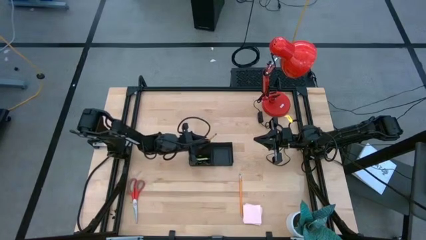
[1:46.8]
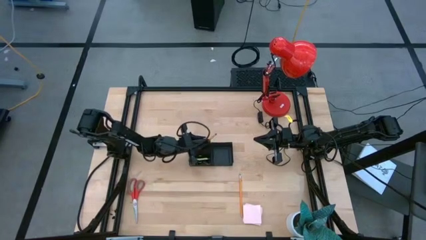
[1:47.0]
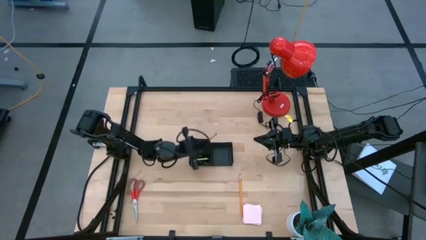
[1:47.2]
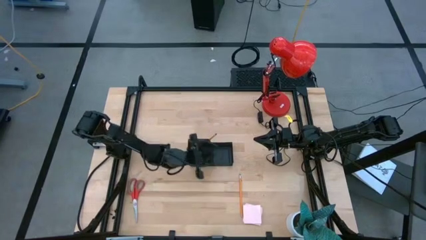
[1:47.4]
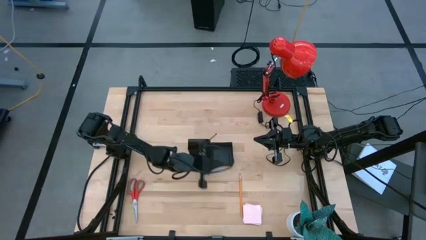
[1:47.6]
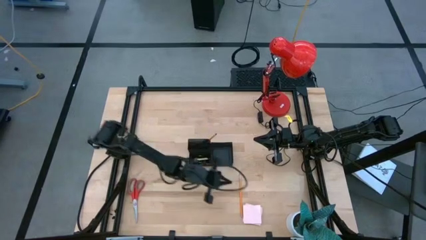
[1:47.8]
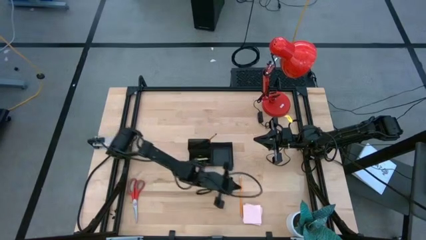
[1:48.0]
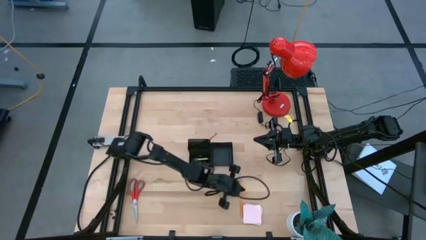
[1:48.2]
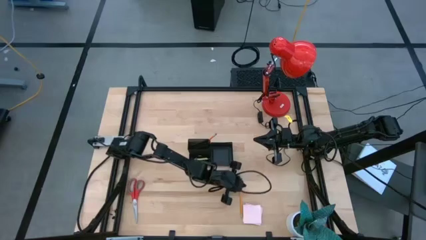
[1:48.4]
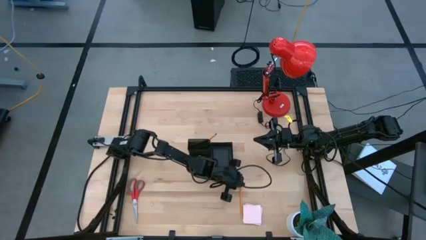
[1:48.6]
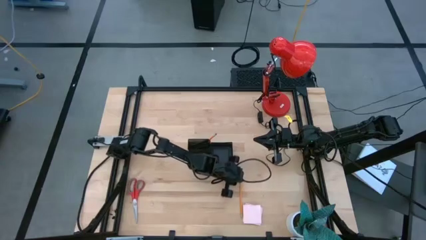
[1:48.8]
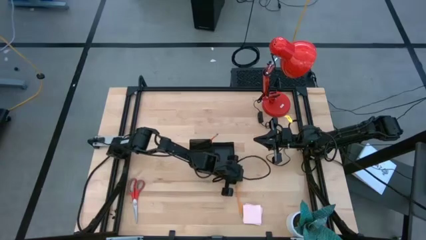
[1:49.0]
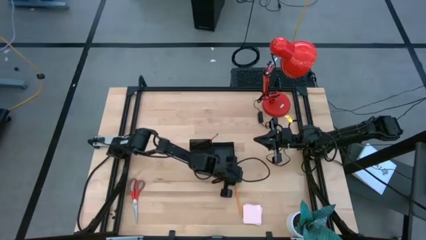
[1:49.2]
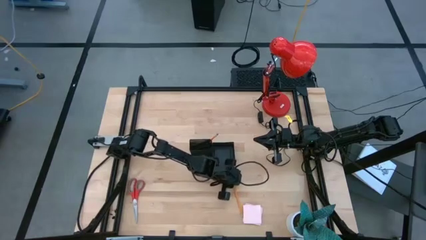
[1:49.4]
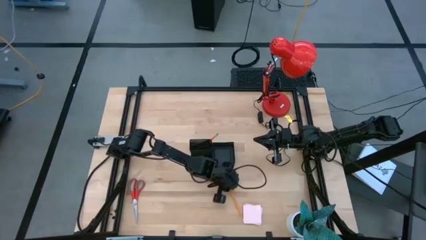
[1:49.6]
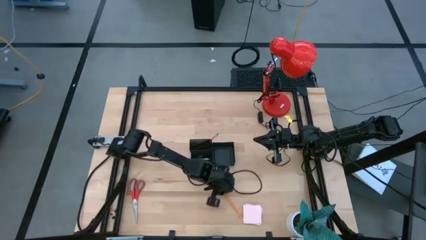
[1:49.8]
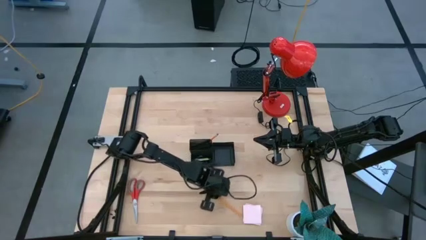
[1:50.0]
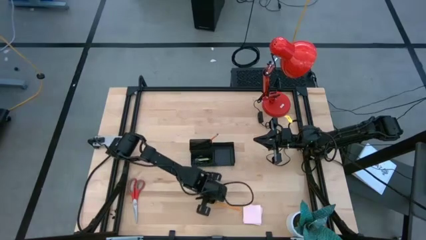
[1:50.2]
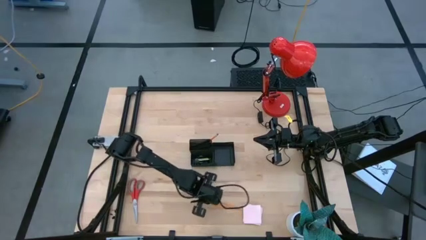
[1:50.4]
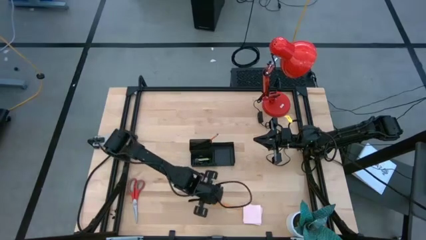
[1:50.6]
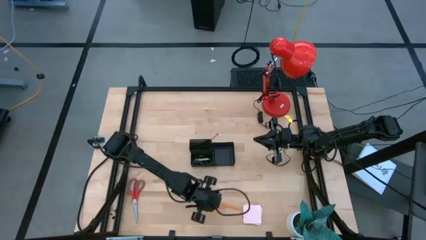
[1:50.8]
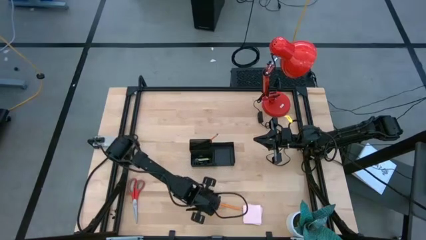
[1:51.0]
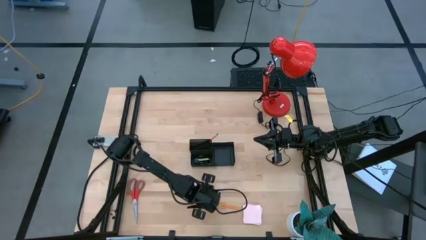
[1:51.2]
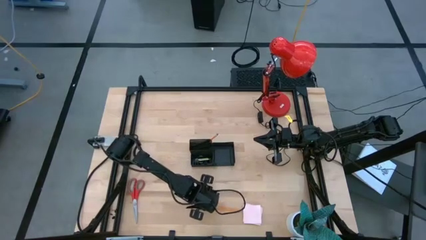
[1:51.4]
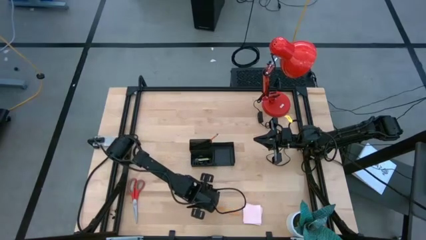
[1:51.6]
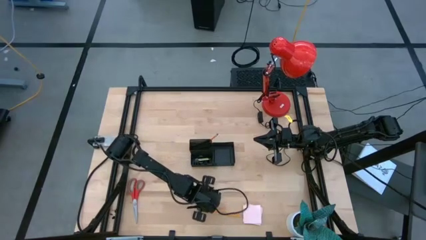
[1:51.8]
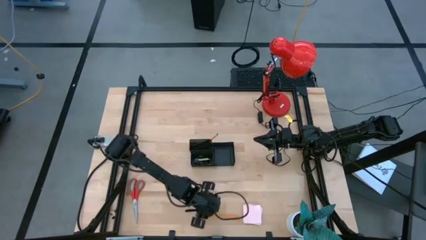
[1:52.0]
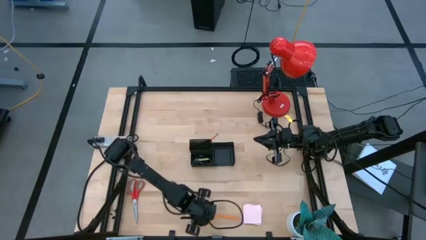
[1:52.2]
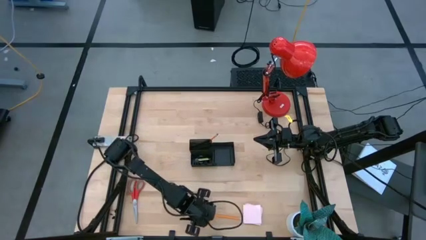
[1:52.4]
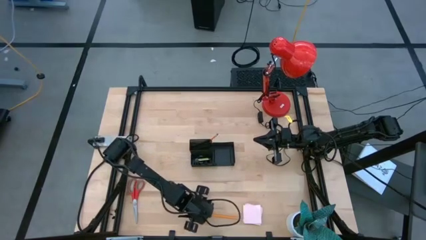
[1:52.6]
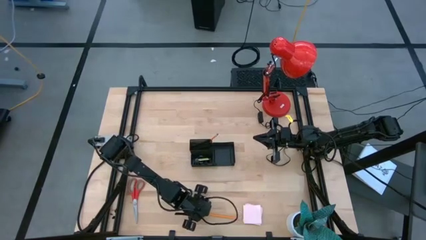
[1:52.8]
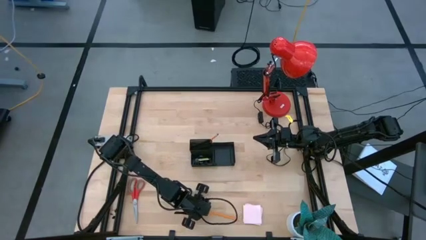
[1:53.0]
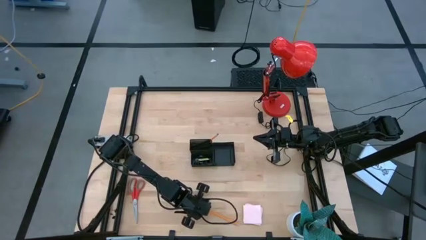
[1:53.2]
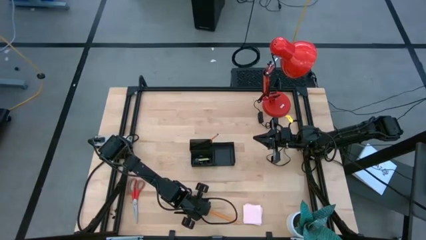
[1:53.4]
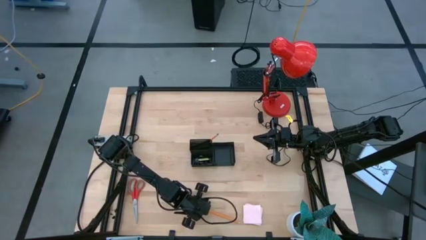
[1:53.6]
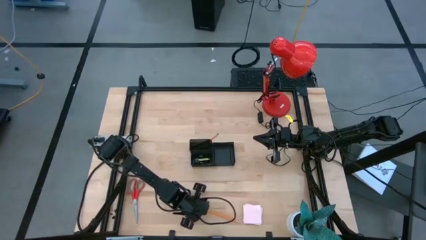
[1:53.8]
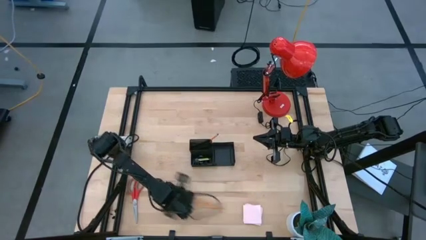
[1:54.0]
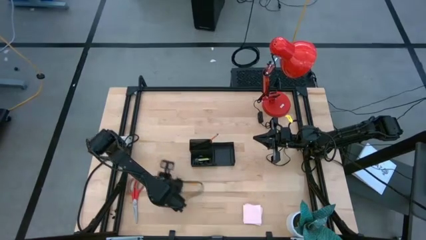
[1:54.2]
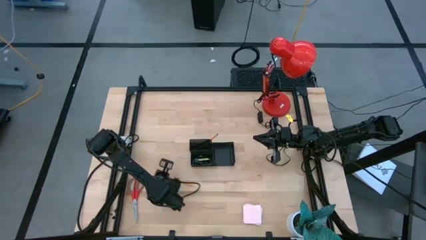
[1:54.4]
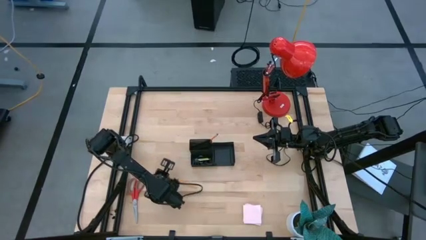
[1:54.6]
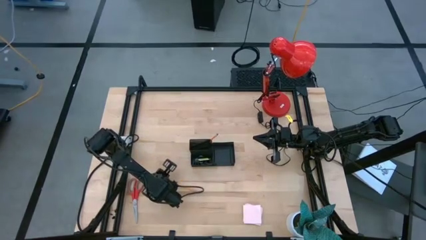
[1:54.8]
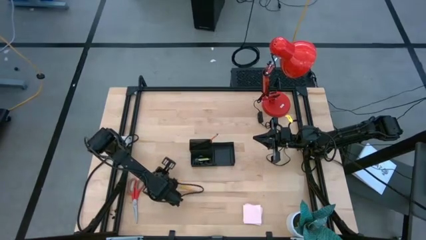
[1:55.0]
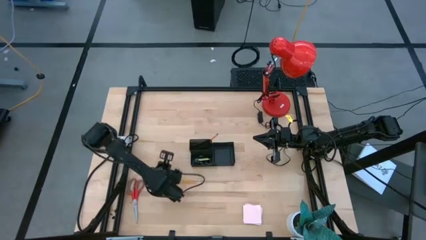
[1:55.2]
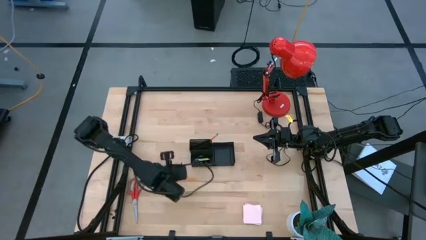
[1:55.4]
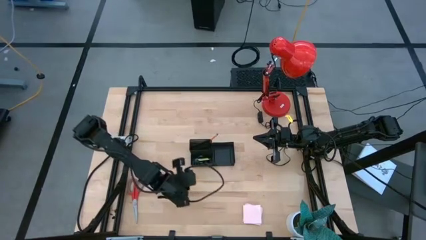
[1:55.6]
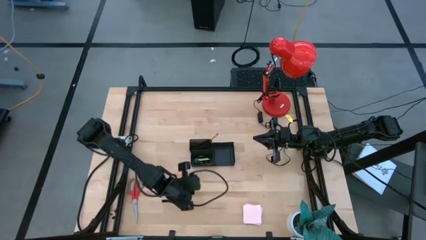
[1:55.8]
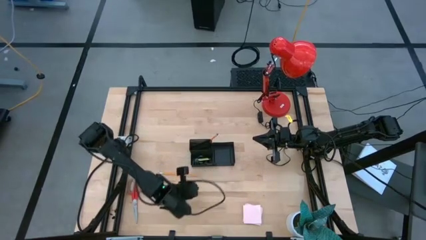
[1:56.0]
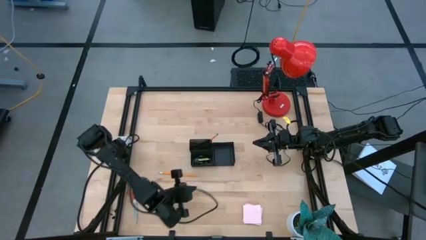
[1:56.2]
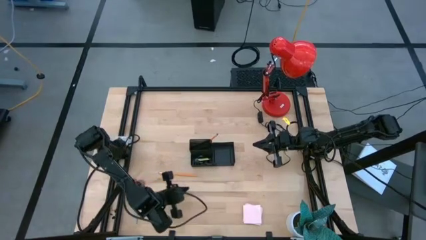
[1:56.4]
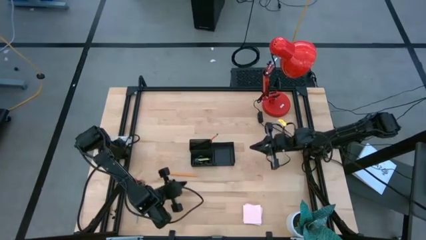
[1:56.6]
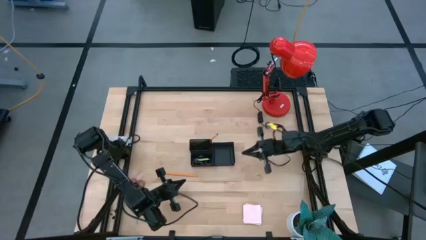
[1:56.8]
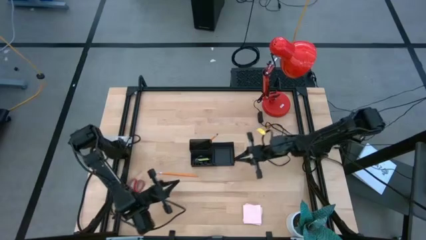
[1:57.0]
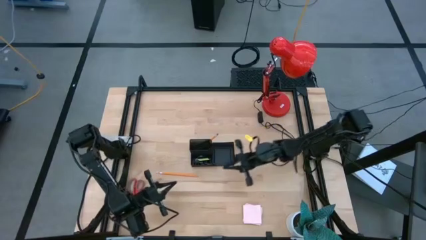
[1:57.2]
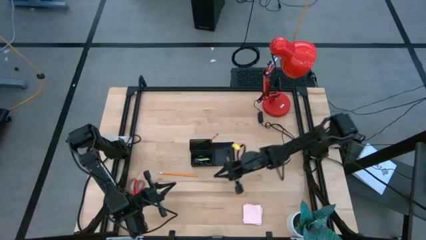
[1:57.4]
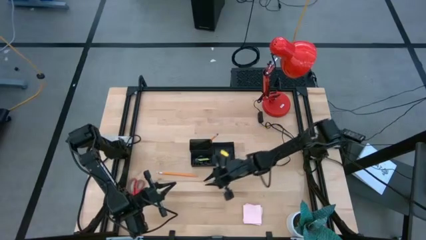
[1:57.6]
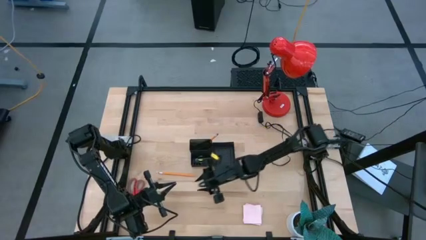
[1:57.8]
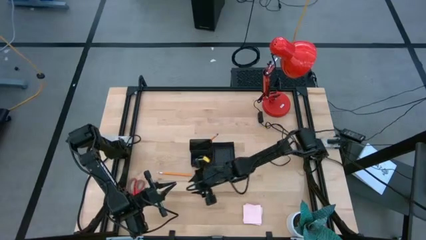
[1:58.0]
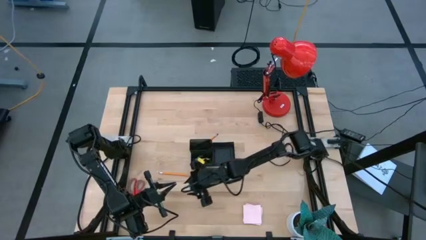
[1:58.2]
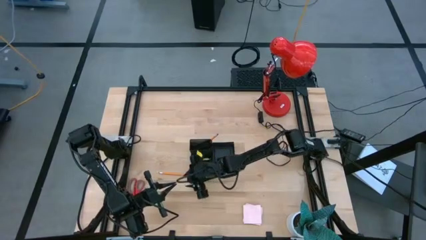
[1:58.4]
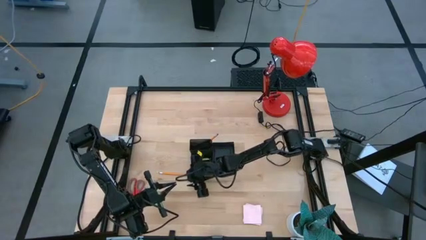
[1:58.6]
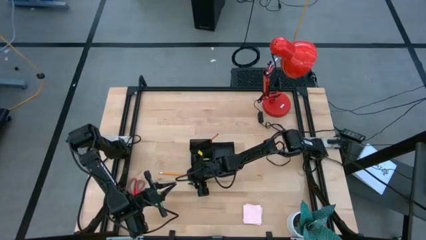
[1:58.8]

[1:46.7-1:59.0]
Task: Pick and place office supplies into organizer
Put the pencil into the mesh desk organizer

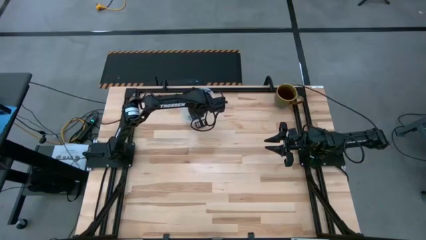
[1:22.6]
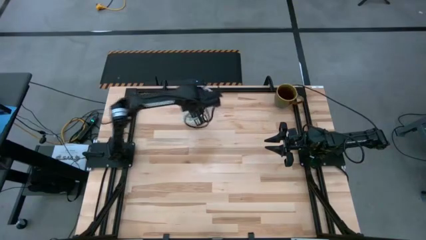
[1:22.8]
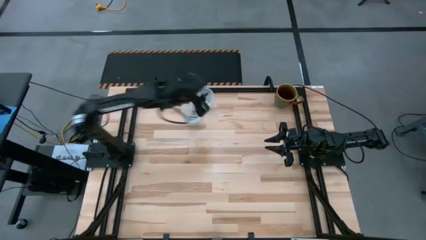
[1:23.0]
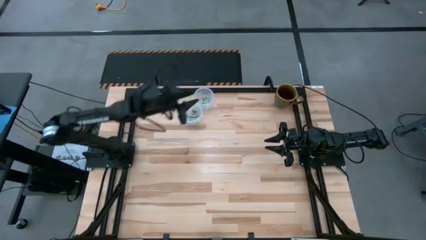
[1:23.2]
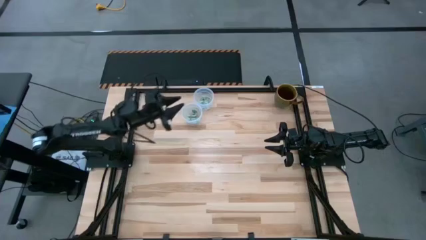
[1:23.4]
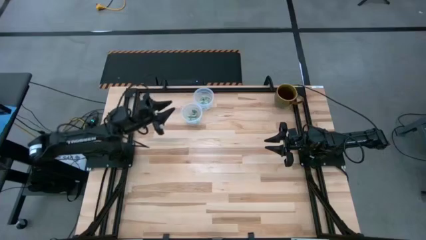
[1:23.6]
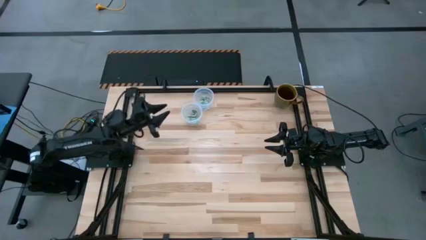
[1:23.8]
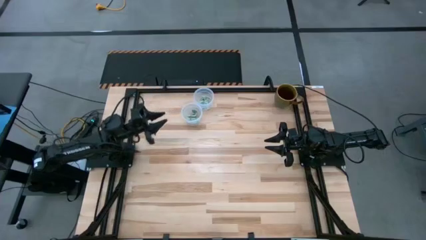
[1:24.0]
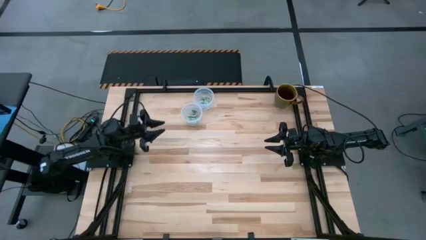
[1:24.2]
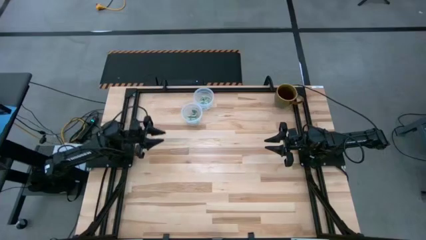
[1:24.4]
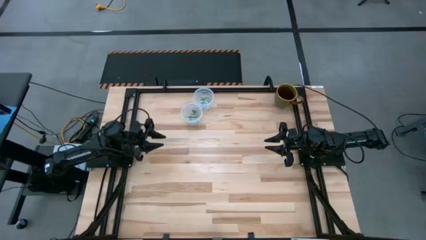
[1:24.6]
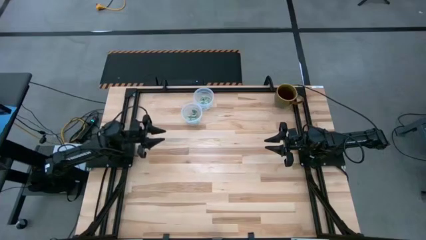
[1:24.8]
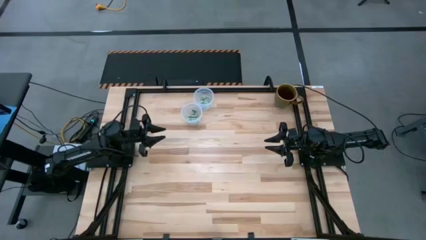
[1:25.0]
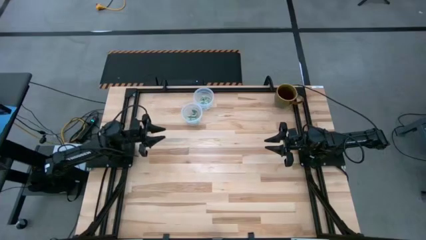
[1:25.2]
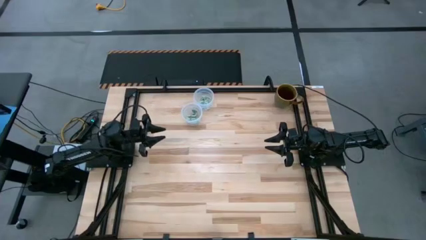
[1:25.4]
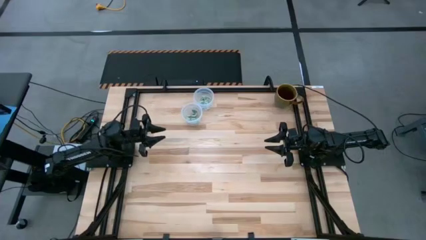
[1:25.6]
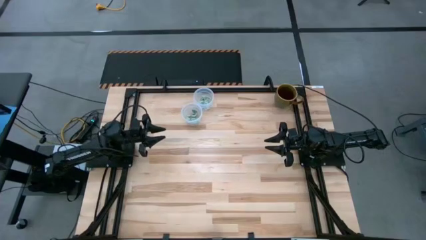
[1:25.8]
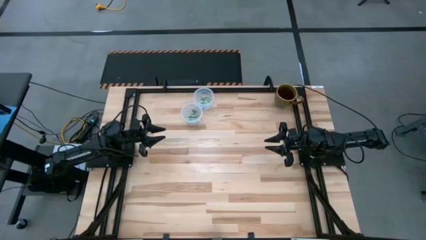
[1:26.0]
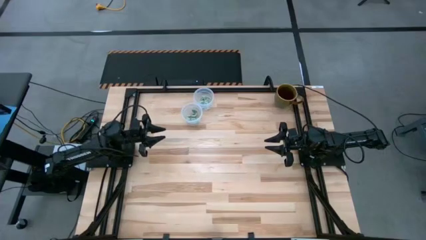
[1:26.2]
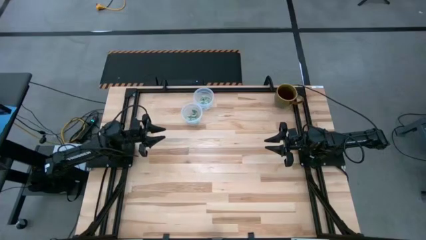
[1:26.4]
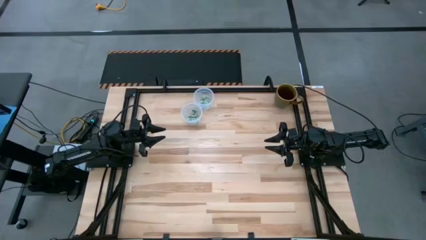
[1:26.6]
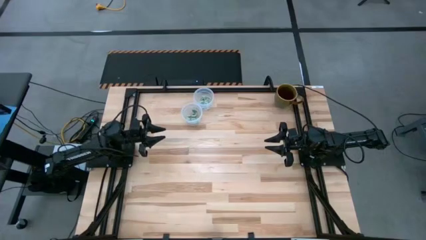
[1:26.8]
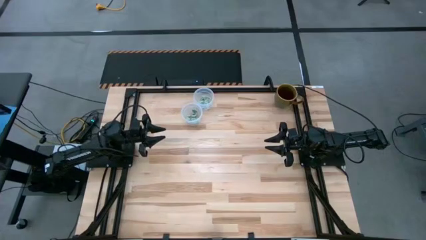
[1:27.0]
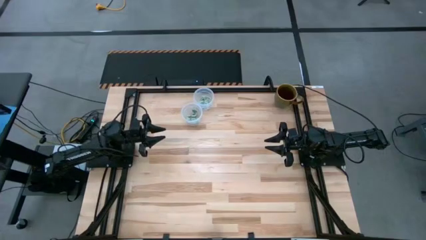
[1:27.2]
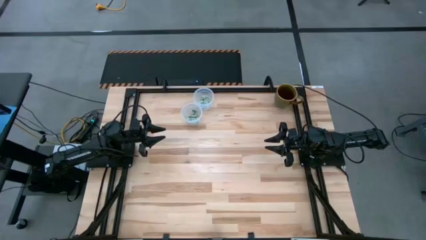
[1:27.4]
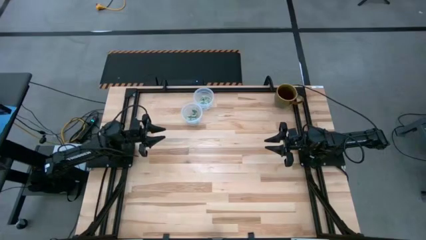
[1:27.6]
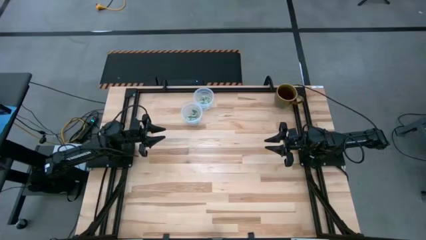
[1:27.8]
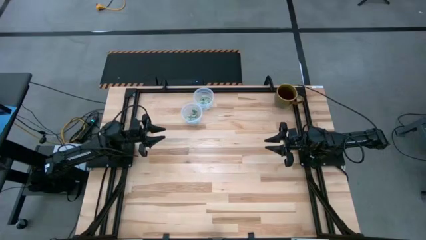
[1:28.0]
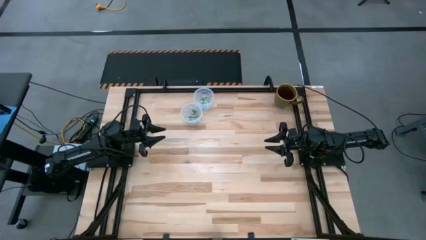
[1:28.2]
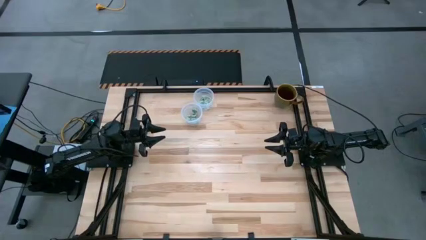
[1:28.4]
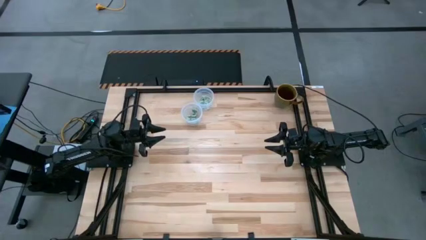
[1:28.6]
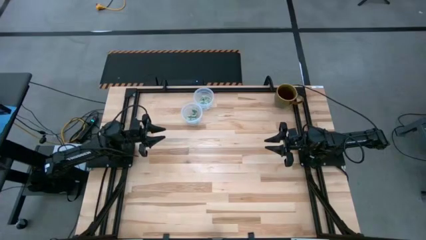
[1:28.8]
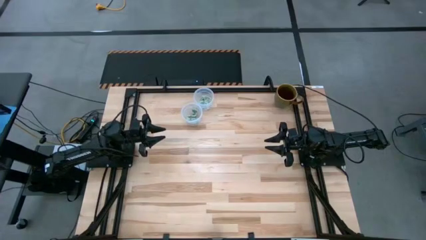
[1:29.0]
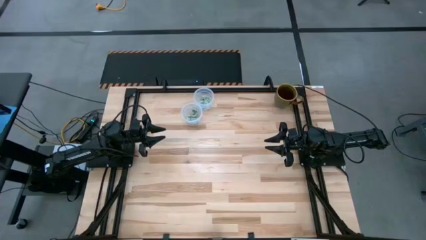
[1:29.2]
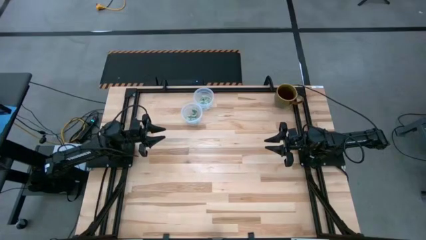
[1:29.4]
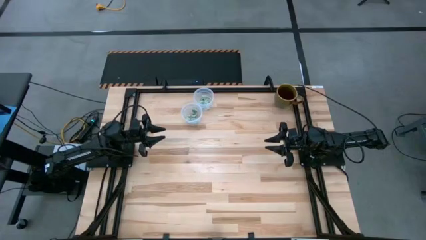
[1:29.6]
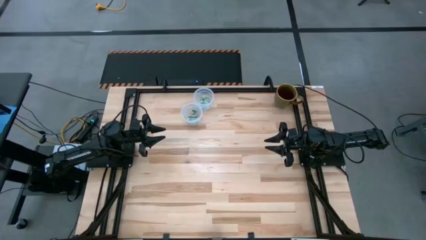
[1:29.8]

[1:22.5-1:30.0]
Task: Pick and place items into bin
Return to Home Position
